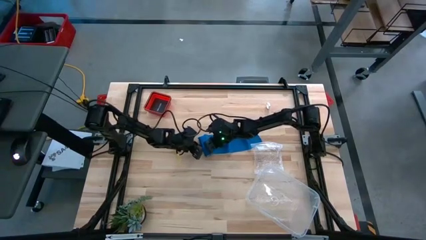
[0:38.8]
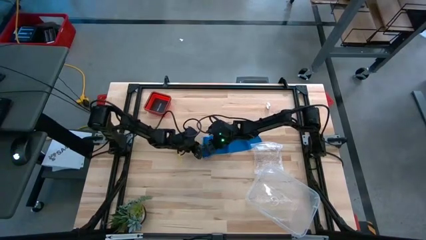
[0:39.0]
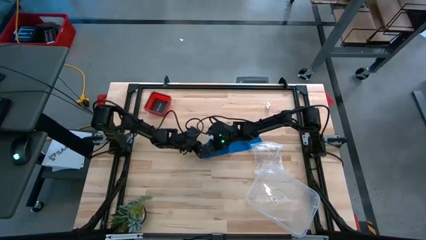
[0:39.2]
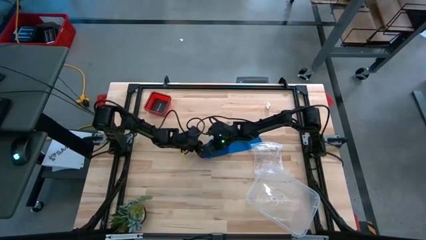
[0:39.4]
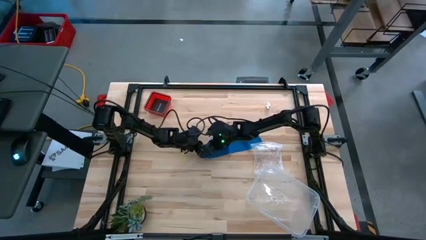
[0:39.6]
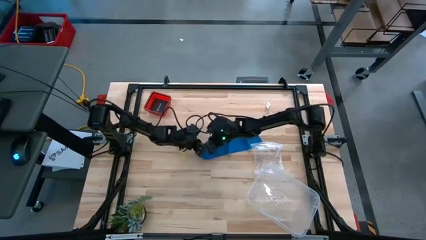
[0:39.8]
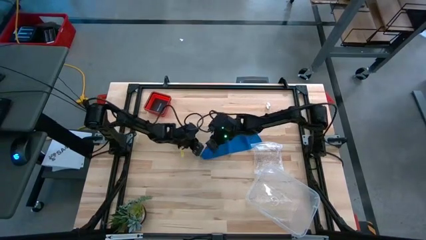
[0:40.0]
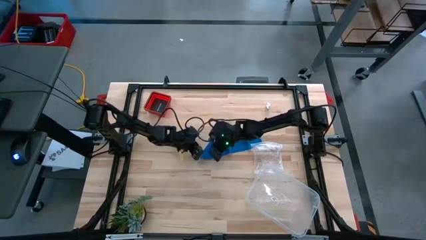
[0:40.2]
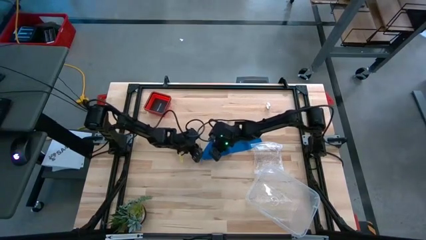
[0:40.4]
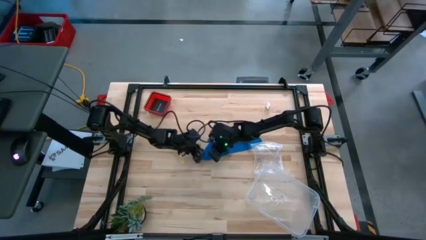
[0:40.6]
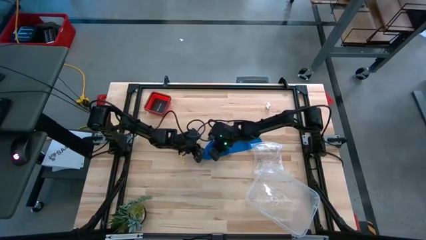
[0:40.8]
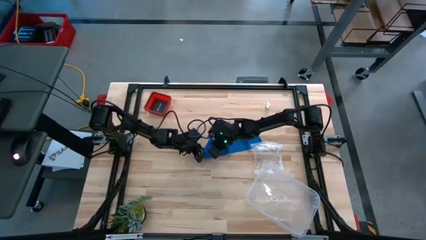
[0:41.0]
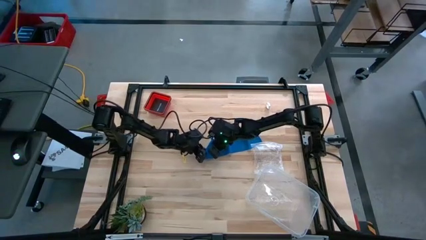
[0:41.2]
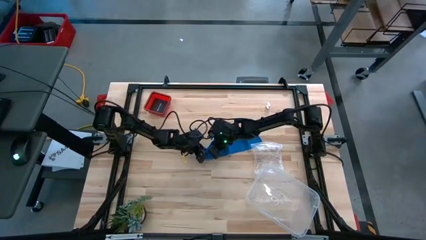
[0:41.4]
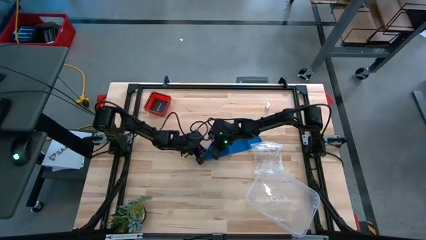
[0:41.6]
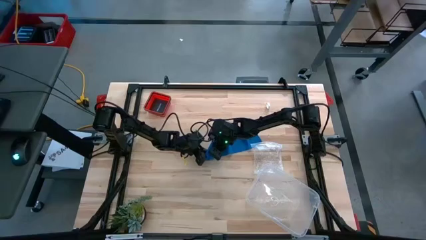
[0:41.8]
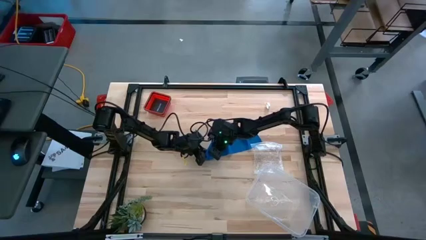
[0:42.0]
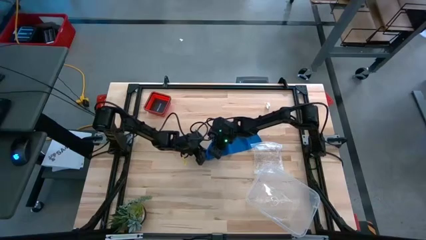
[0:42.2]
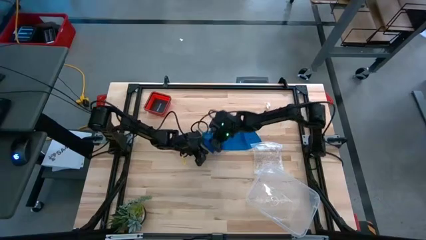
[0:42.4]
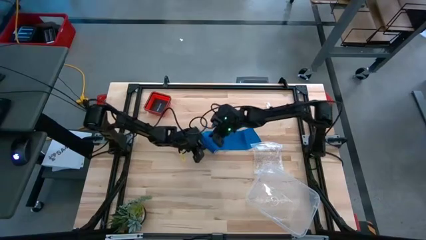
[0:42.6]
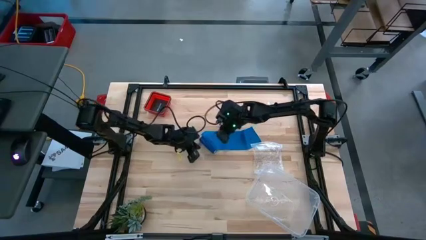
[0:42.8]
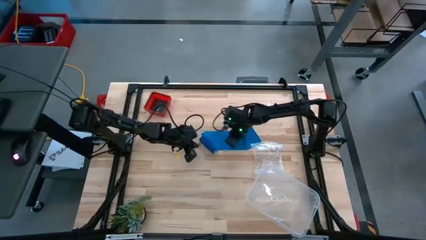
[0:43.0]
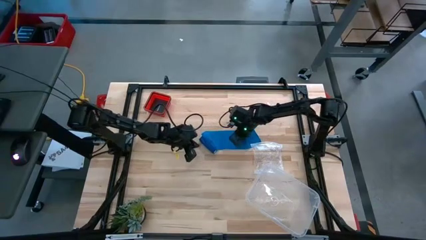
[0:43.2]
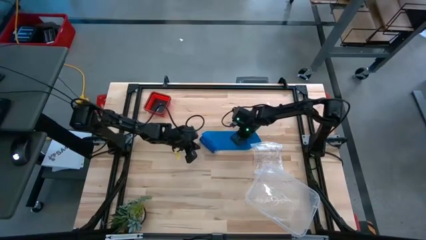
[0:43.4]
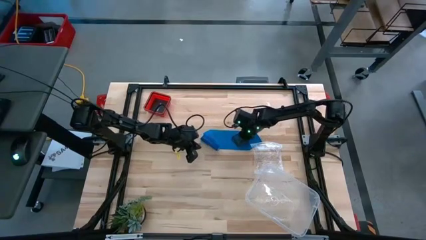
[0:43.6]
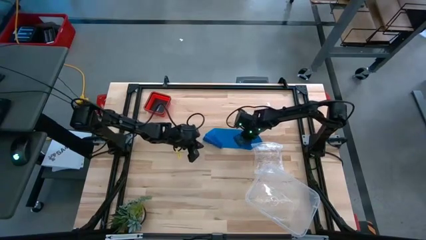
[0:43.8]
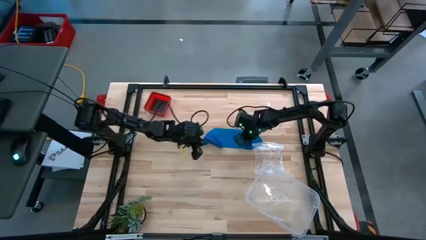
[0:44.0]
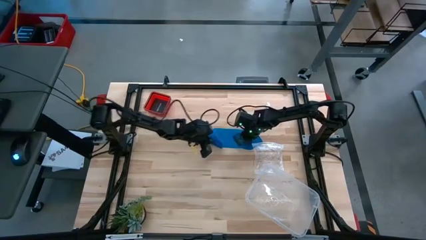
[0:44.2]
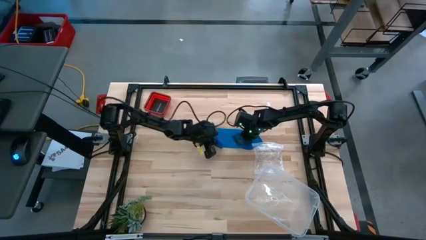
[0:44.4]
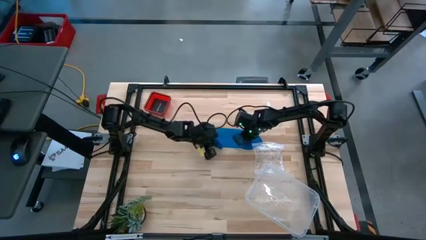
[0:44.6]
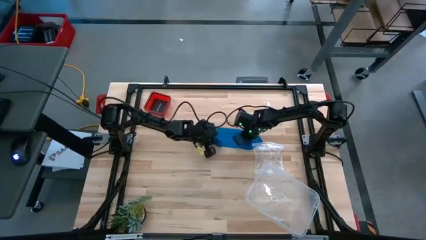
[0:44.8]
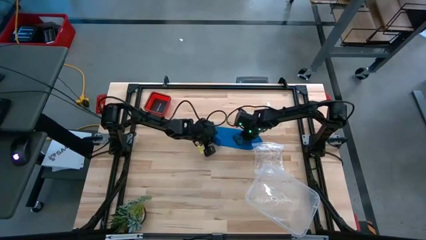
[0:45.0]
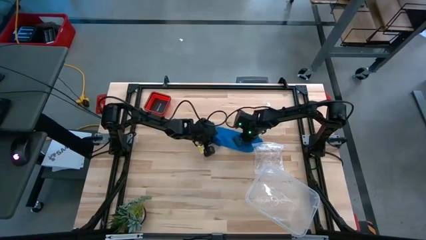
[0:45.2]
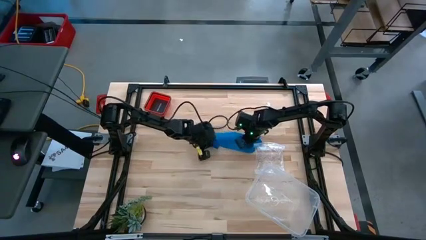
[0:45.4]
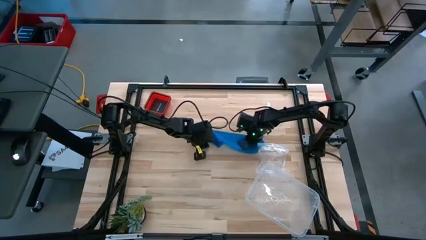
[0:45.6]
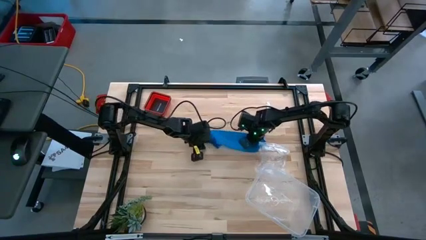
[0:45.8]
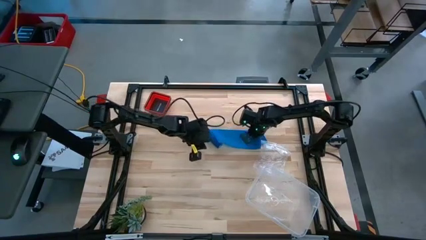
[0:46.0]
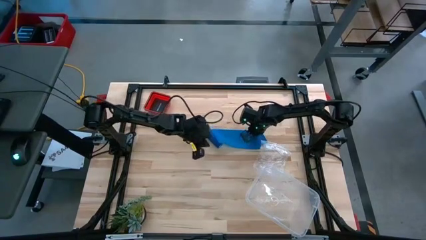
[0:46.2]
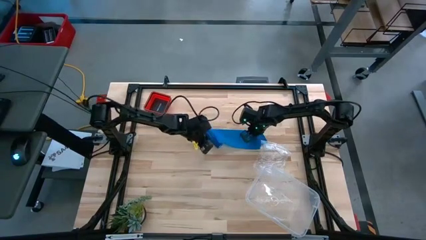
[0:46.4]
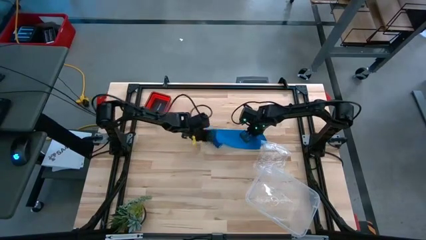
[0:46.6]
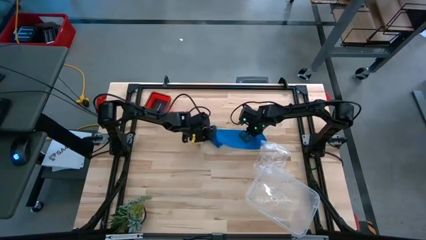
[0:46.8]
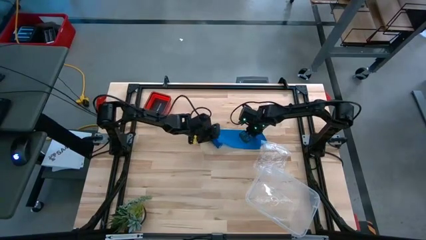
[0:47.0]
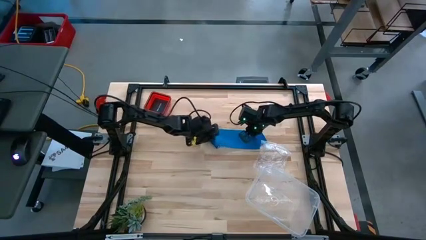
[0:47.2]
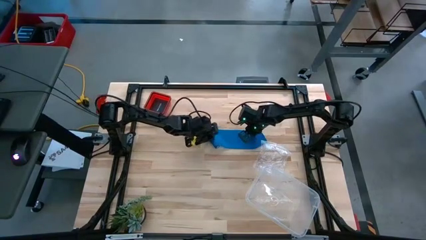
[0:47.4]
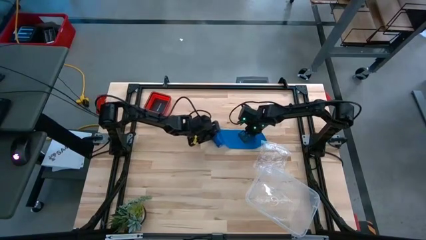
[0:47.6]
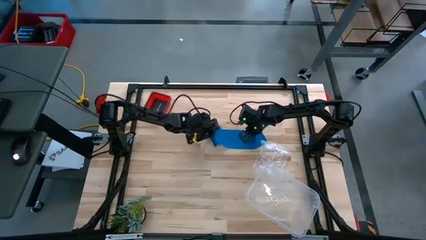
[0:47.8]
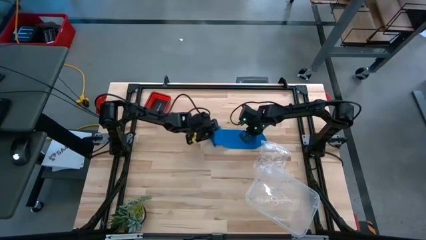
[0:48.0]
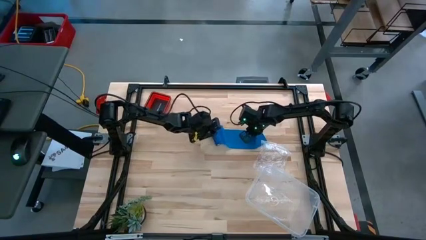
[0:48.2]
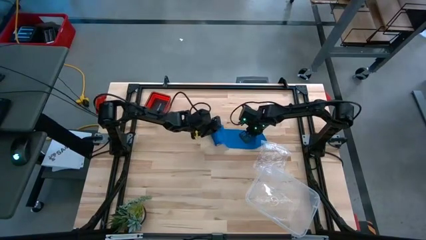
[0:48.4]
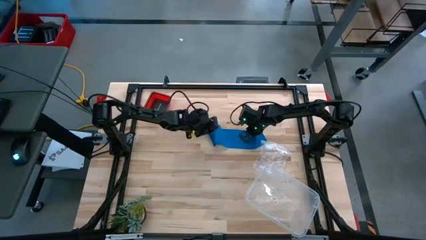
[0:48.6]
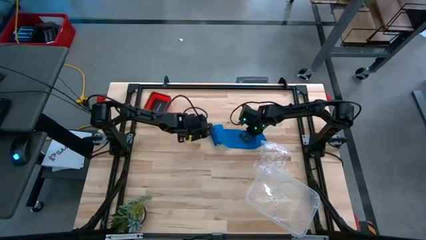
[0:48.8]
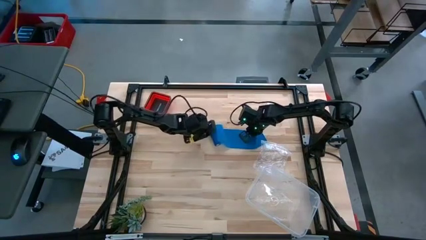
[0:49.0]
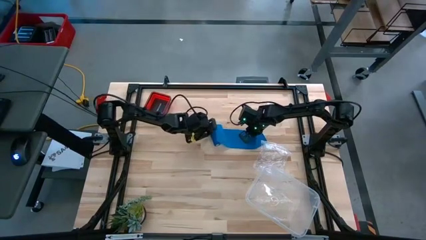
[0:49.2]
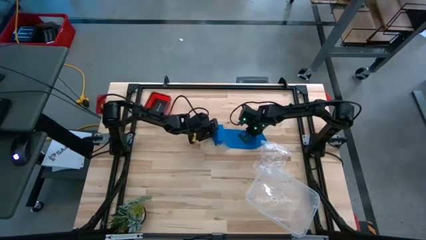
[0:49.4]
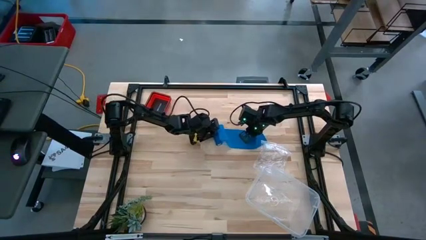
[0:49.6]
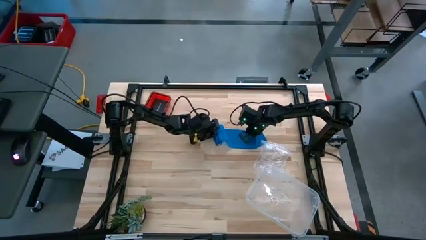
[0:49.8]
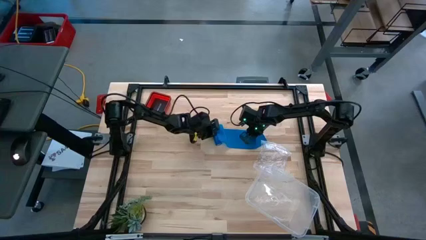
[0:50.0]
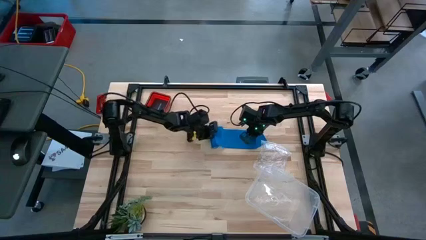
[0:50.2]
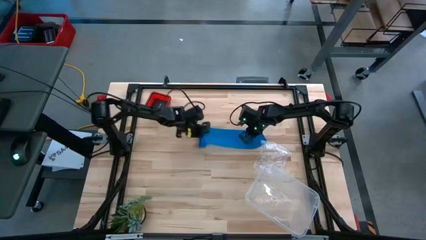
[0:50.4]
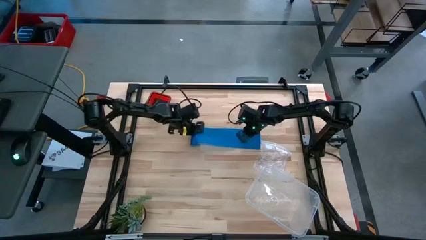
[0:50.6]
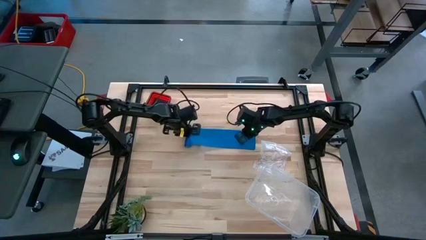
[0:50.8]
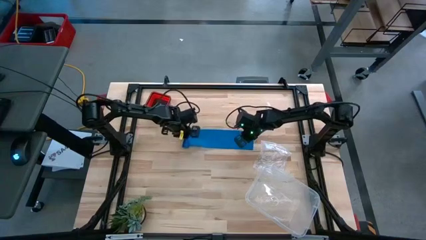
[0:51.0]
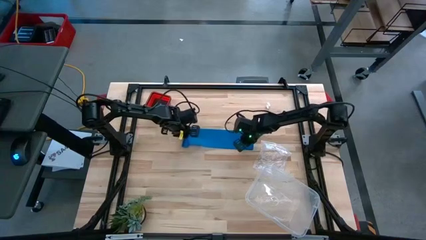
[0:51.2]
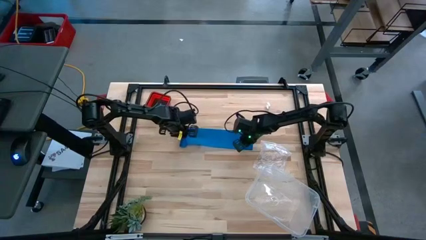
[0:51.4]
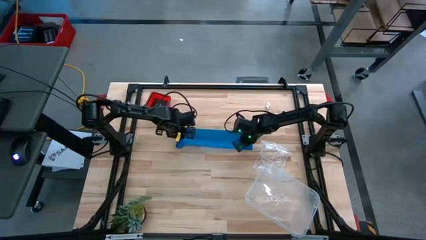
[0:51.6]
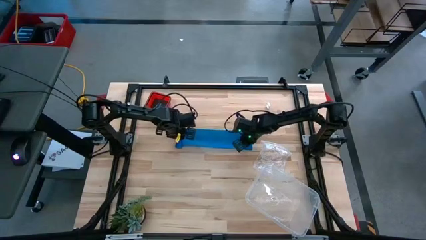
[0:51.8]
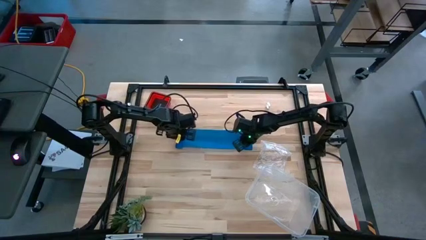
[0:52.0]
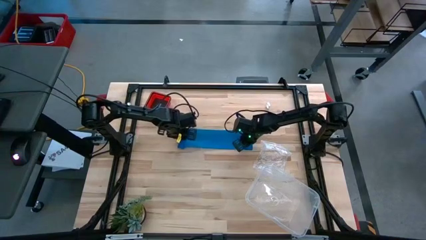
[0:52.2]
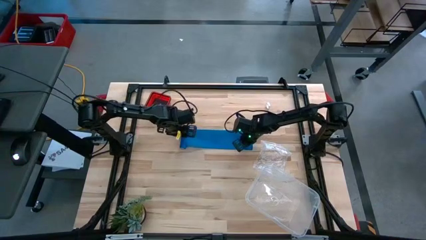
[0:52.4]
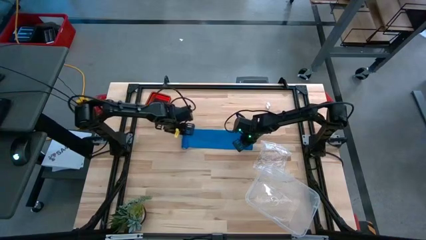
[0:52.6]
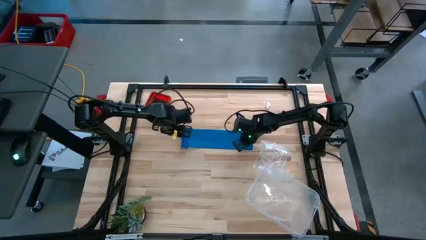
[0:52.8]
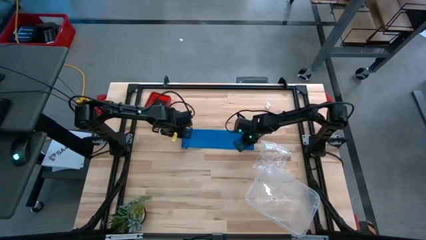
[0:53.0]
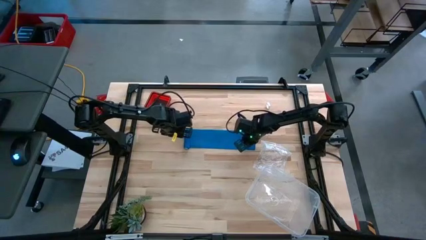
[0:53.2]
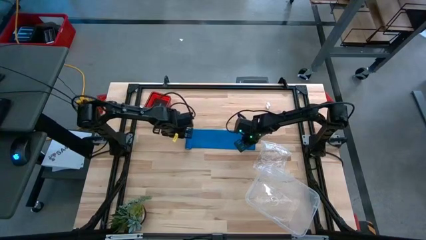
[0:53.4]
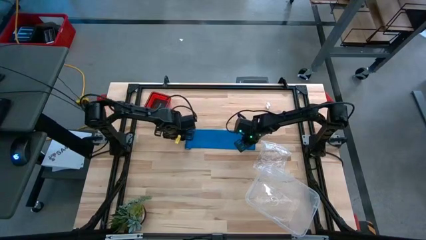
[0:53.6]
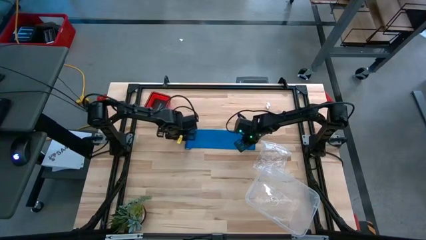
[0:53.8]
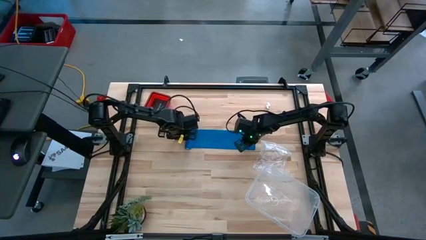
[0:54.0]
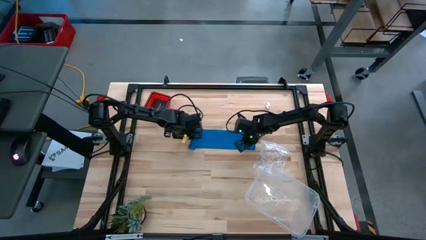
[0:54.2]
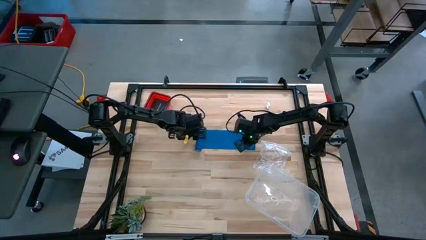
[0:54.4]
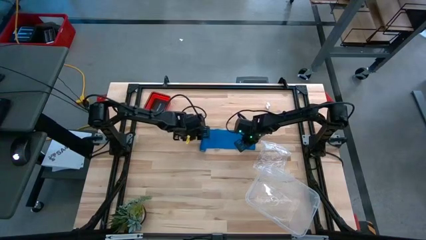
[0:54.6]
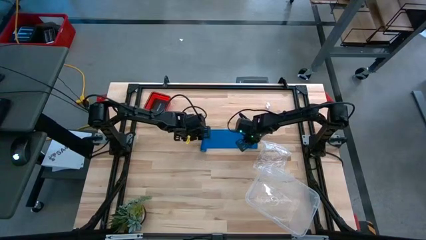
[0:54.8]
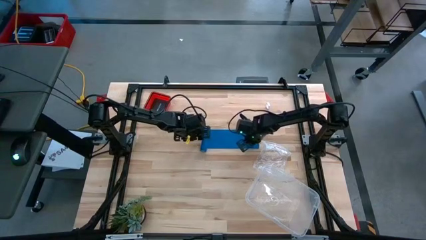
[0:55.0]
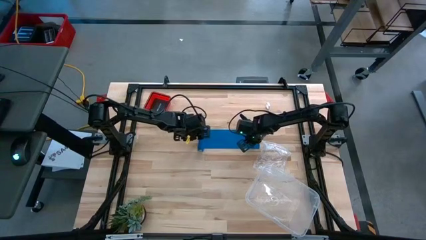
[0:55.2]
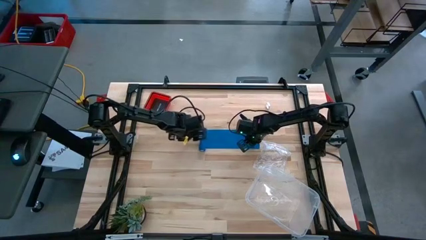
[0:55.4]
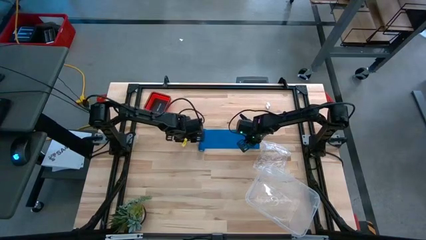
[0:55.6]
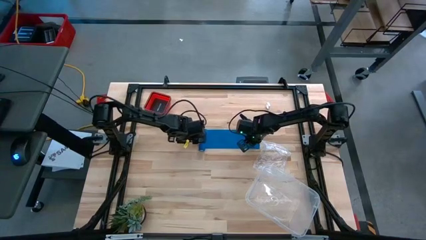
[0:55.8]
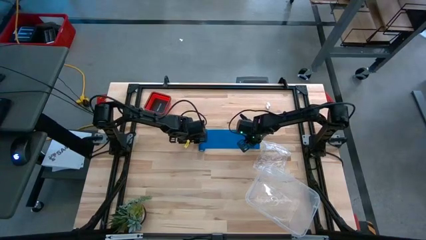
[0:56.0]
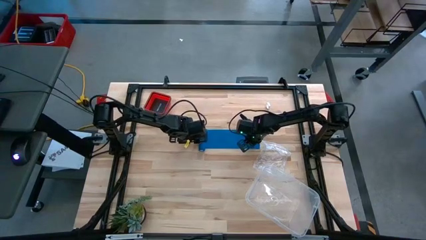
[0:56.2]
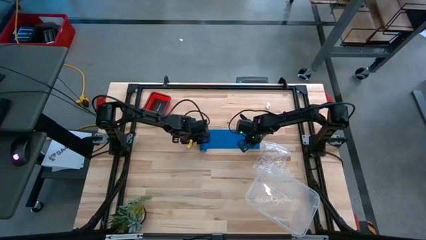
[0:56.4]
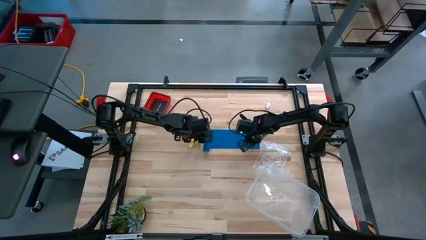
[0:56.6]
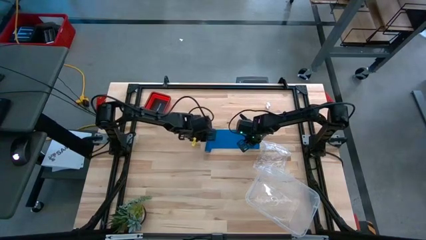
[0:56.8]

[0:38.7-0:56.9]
Task: Roll bandage
Roll the blue bandage
